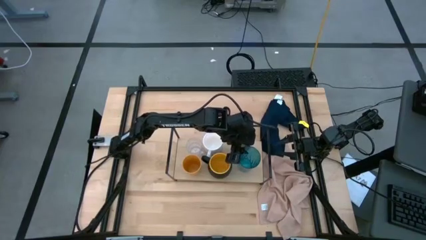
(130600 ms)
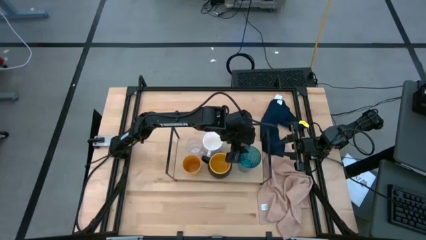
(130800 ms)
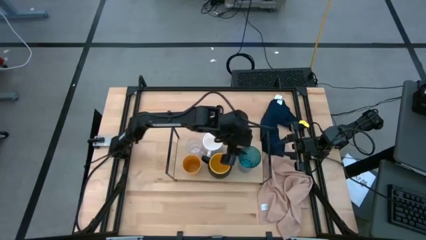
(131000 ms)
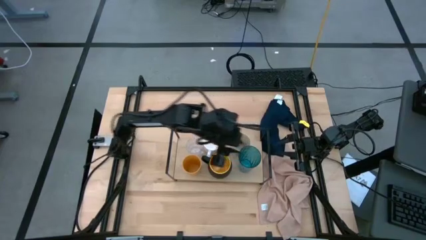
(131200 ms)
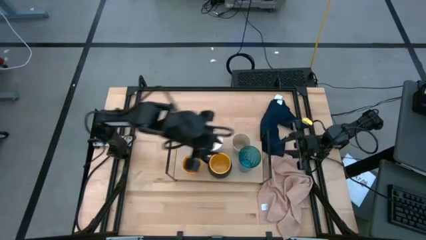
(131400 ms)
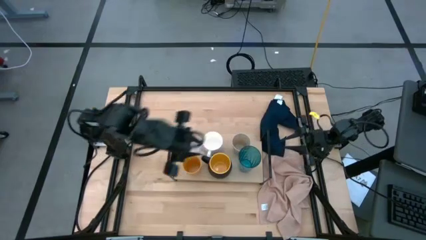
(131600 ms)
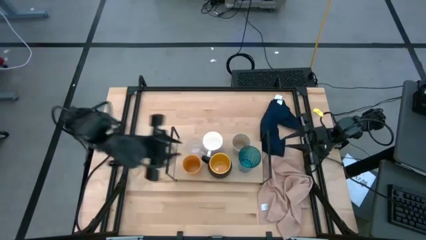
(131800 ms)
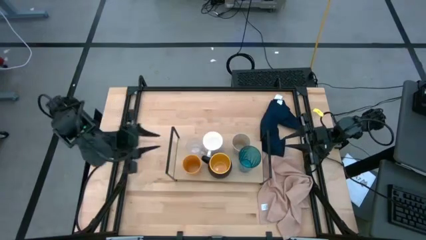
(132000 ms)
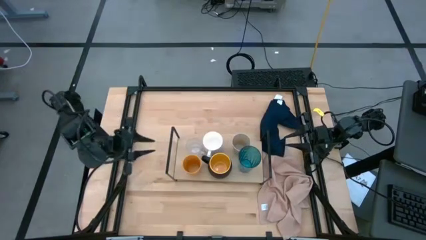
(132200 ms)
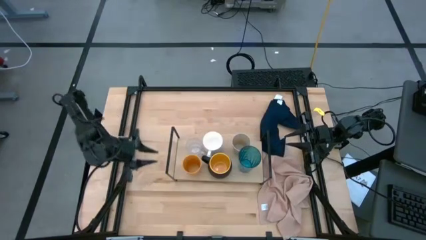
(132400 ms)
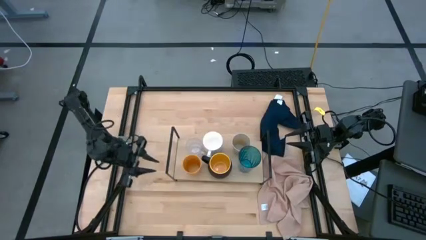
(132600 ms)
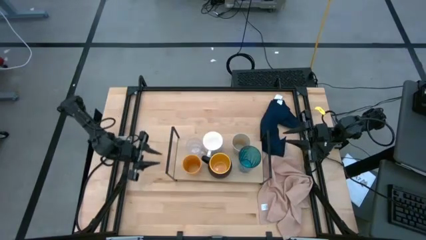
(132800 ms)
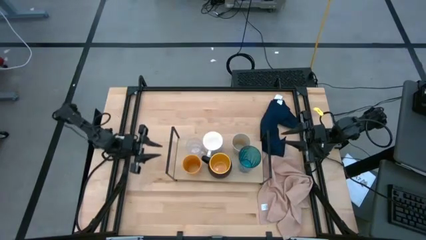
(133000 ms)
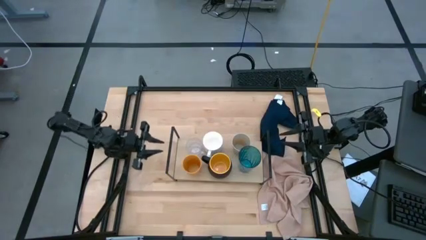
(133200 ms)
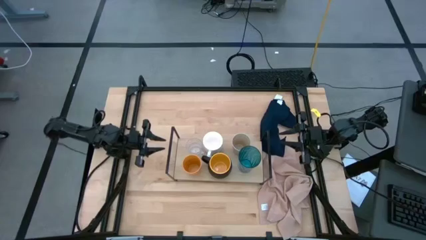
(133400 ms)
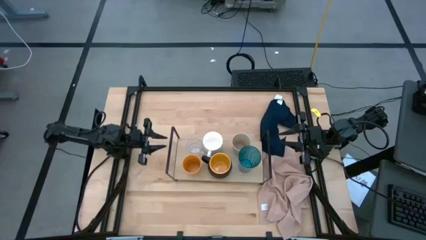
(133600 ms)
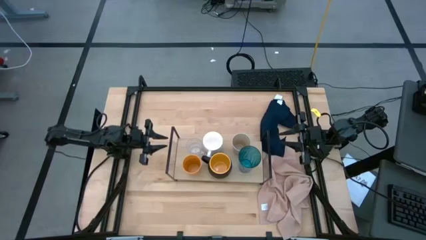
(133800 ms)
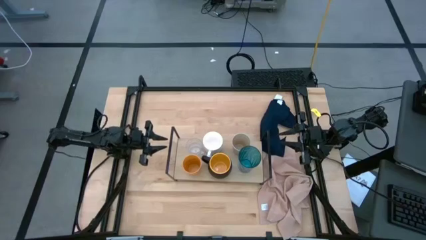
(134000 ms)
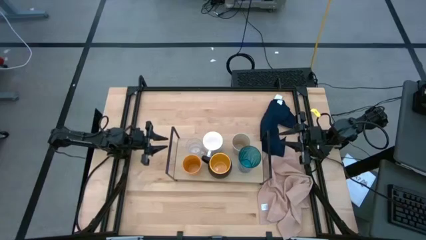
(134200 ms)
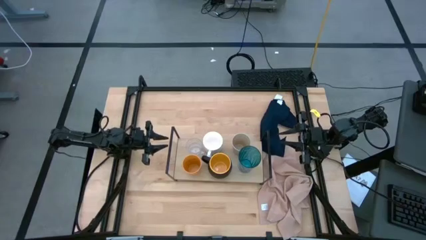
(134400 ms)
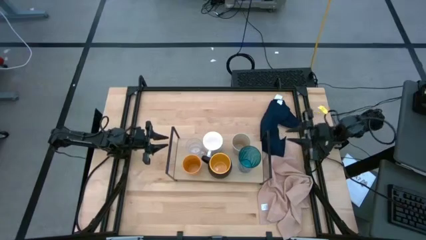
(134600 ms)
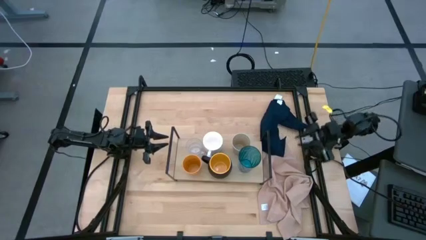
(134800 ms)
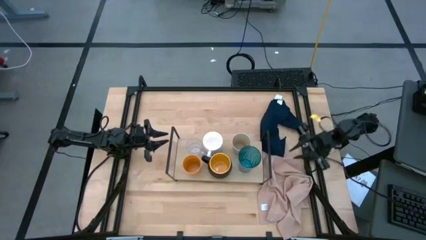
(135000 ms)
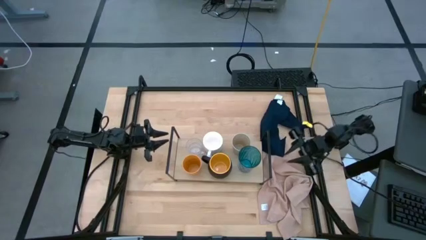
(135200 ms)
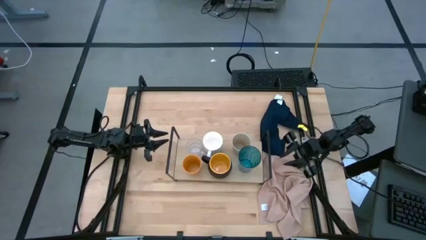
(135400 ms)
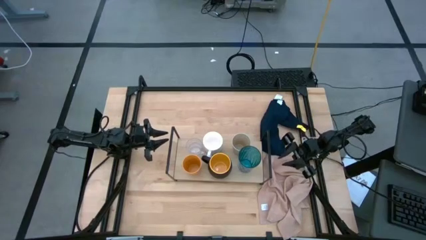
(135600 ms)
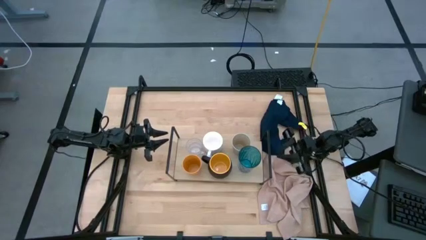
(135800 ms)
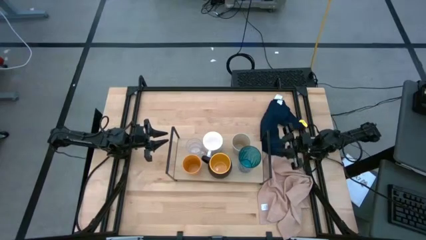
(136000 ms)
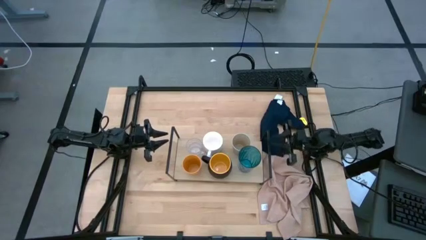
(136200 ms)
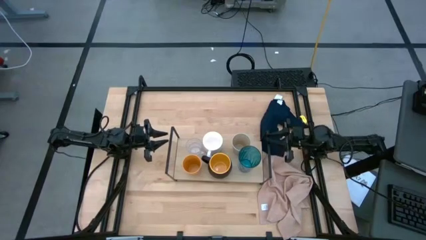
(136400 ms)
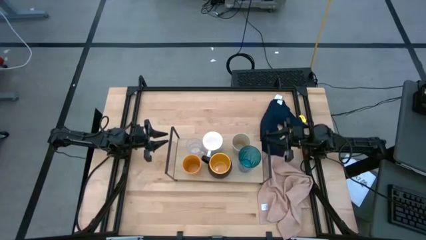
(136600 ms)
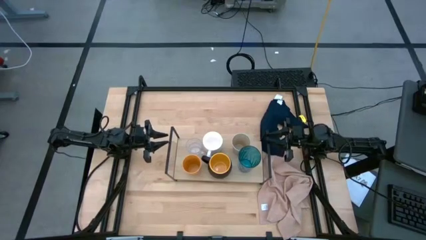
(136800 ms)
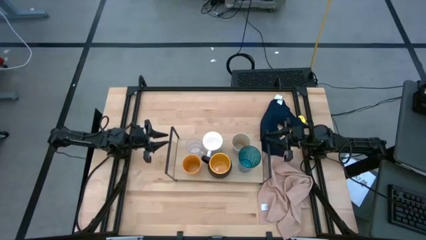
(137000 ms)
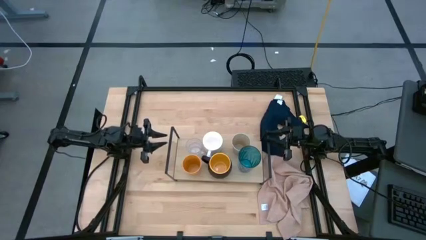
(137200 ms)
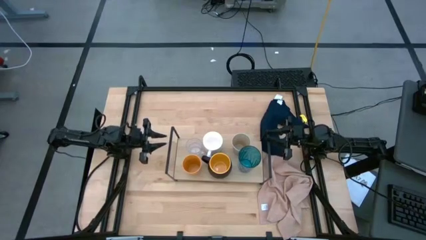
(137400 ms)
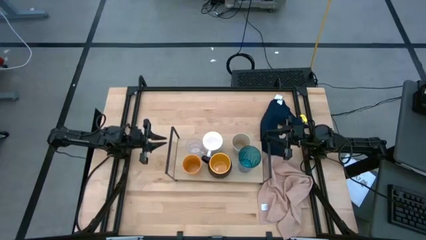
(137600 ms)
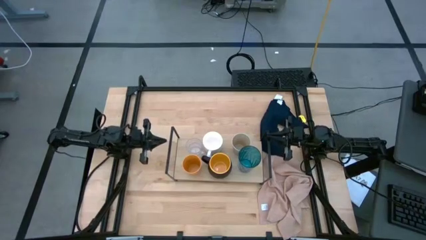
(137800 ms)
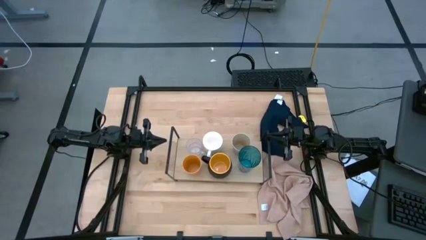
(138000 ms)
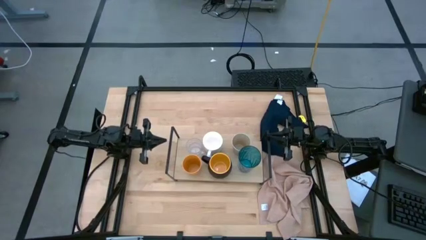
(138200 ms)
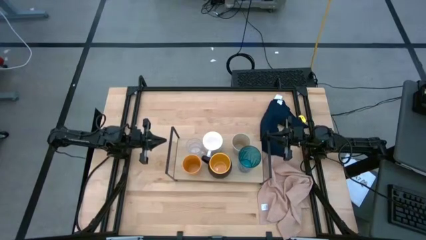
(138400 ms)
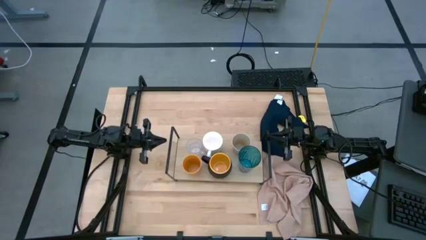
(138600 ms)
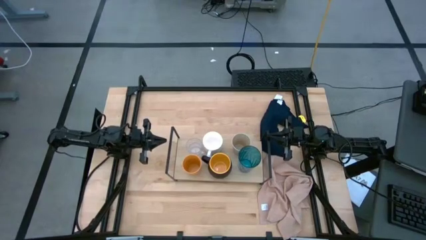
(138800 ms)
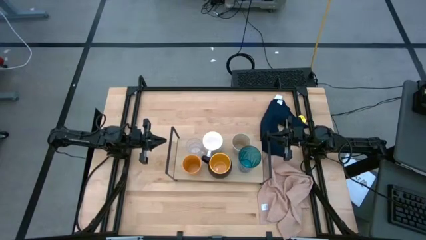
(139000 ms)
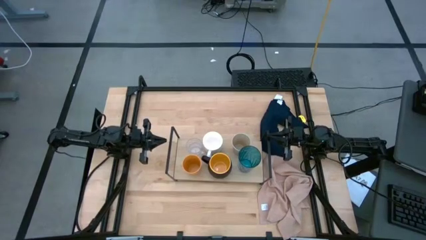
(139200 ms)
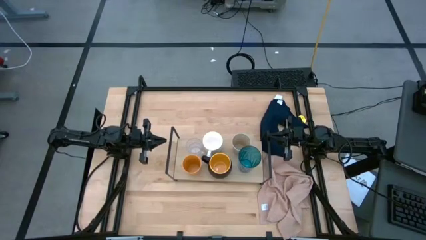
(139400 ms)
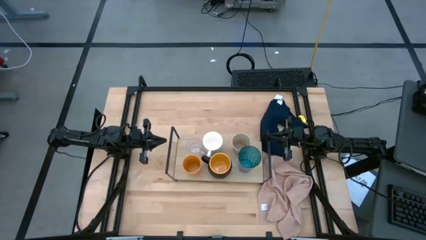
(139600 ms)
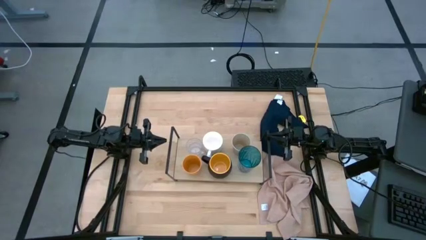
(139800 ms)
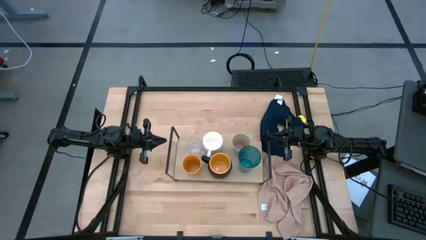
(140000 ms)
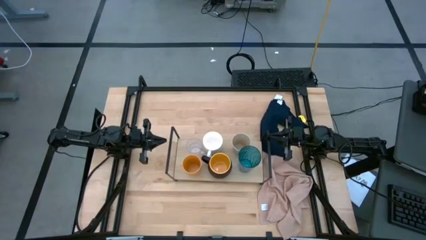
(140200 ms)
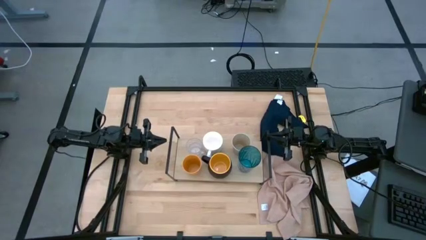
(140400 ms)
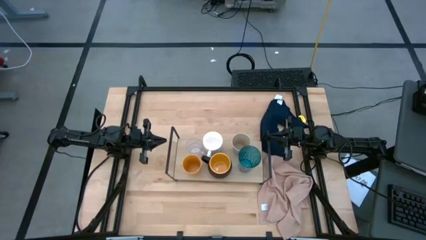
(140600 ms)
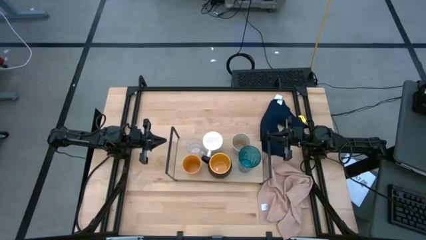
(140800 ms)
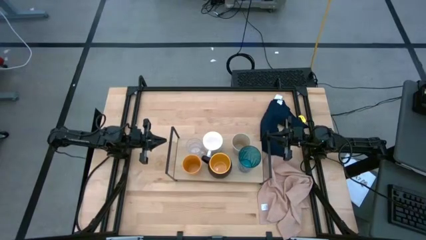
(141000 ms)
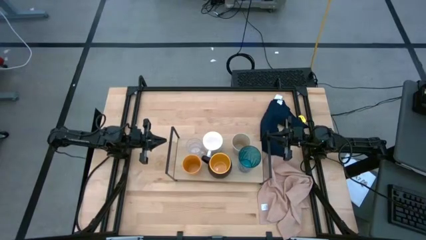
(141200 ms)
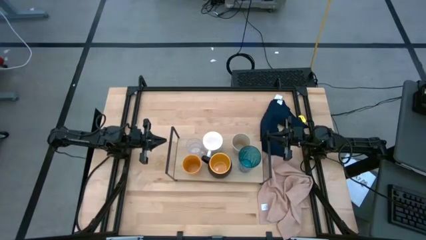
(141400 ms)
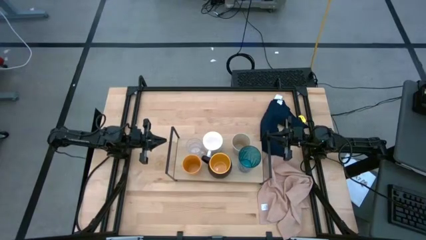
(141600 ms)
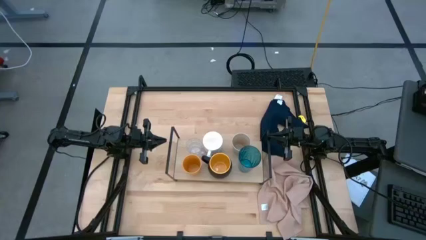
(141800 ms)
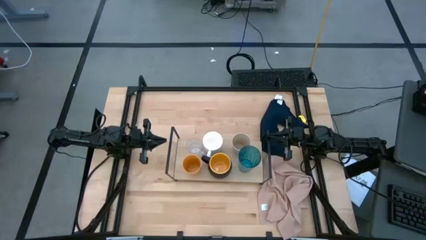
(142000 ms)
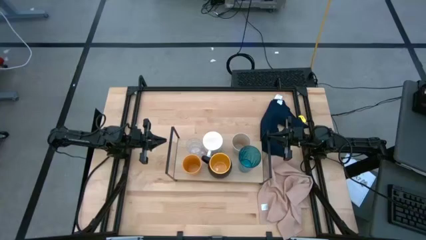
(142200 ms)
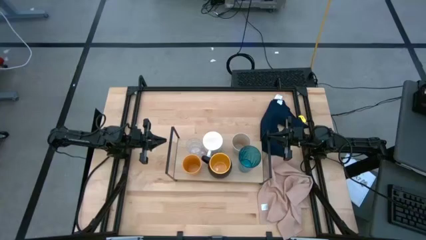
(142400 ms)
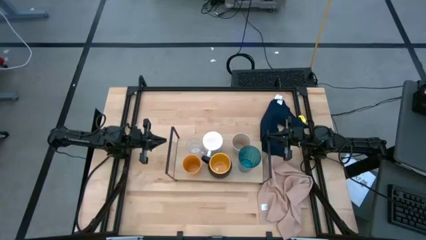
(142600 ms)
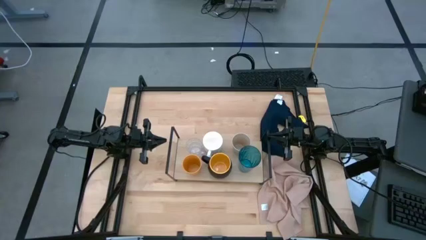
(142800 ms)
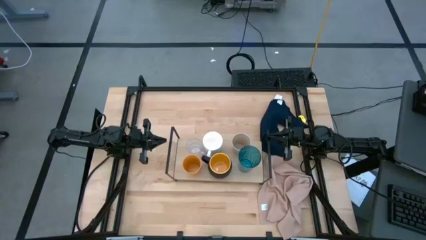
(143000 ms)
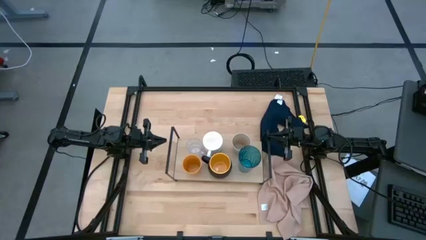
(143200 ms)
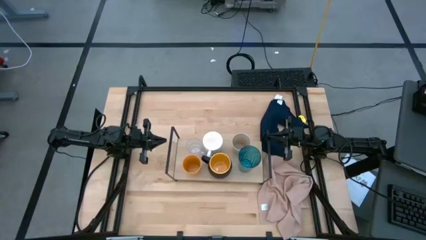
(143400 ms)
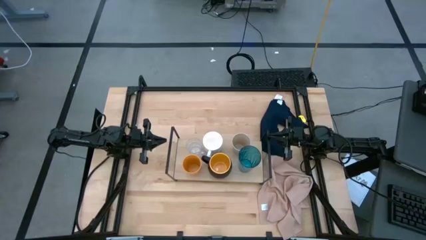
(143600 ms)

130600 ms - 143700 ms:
Task: Stack small to large cups/mugs on shelf
Return to Home Position

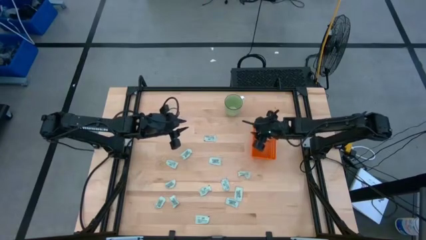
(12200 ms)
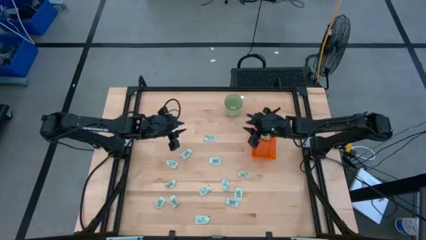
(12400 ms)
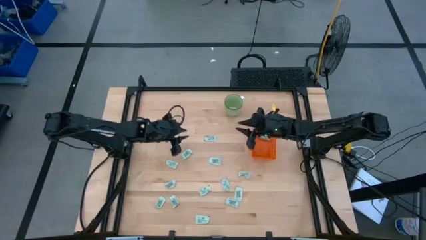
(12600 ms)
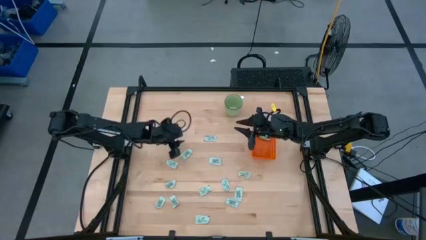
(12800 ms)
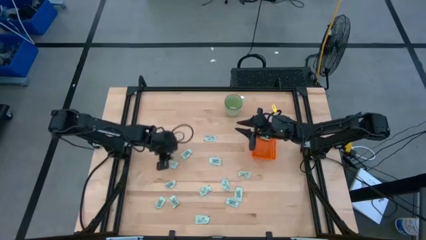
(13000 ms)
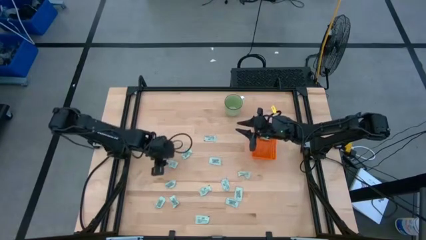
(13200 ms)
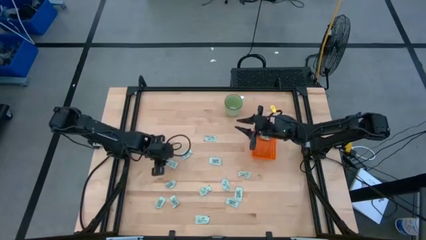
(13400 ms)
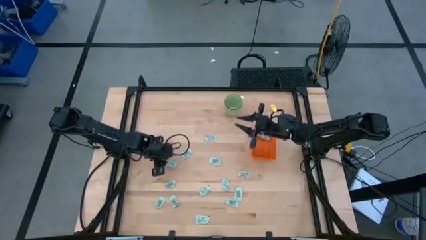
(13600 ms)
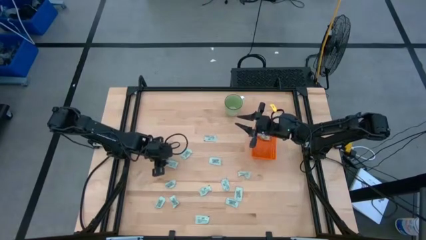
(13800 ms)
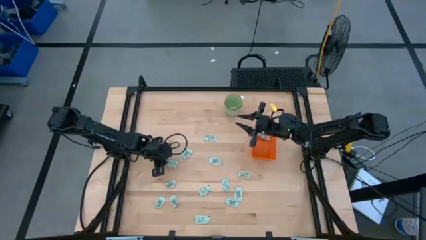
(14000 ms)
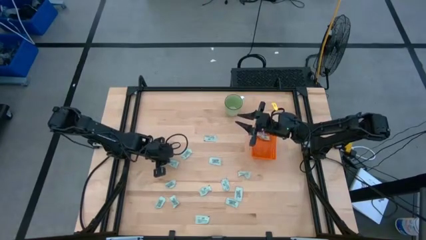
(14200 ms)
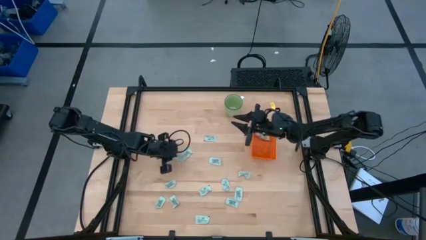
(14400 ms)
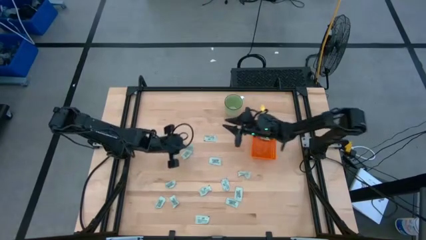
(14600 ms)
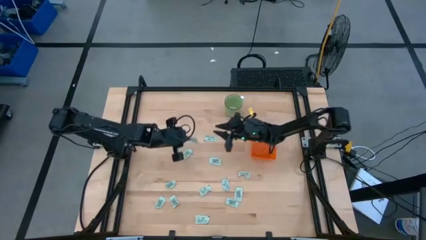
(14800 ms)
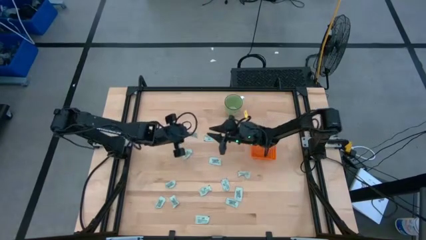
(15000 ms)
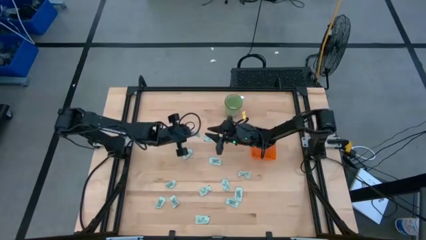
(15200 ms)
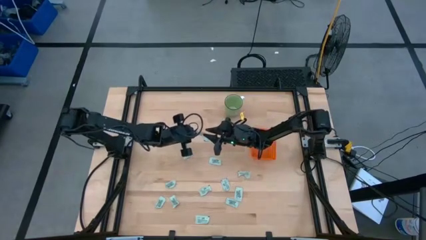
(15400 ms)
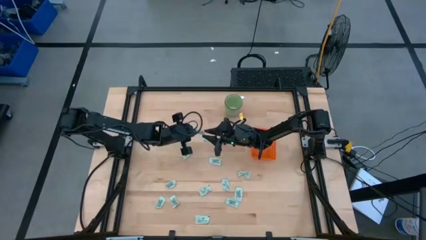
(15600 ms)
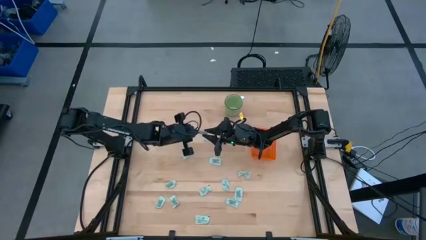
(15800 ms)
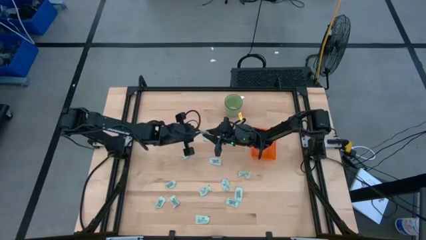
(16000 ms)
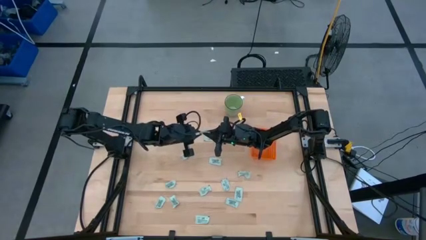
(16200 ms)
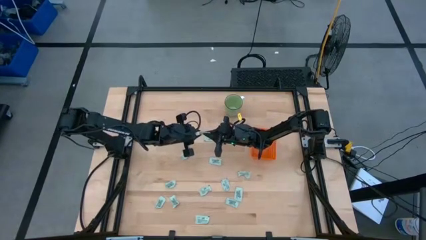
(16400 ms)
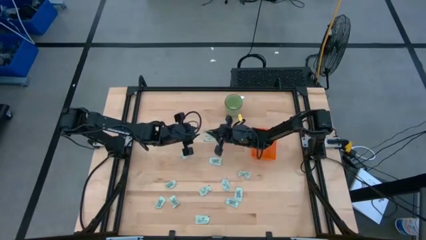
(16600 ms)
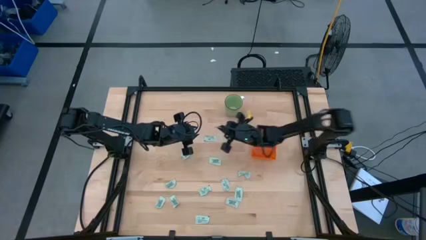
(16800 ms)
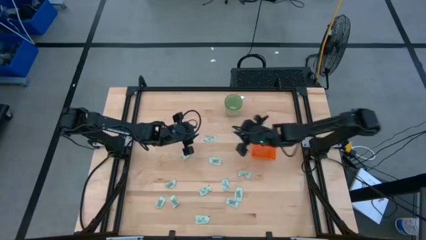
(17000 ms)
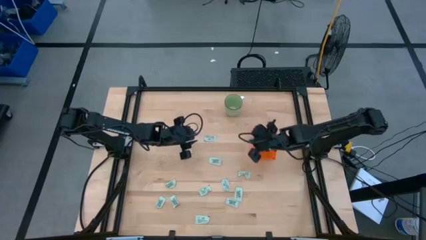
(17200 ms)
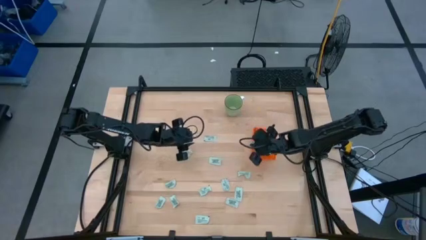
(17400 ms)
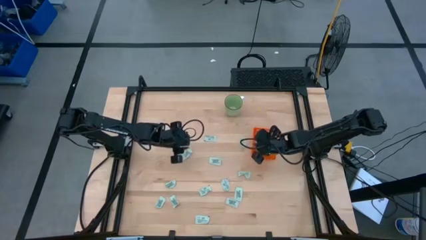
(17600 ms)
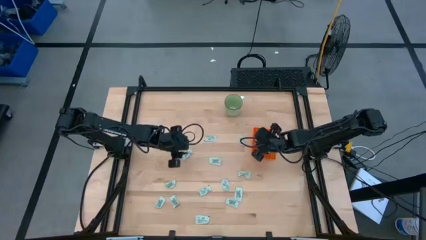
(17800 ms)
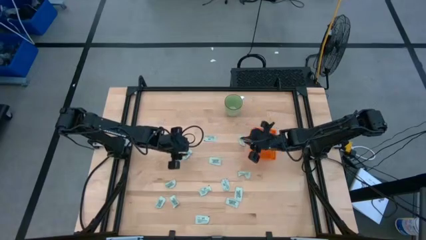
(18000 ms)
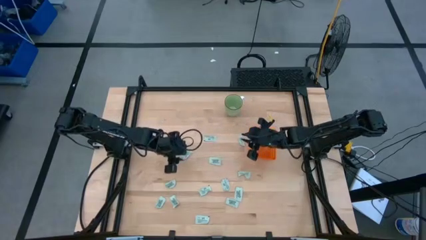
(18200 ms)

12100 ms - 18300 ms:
Task: Pick and place Stevia / Truvia into bins
Put the light green packet into the orange basket
